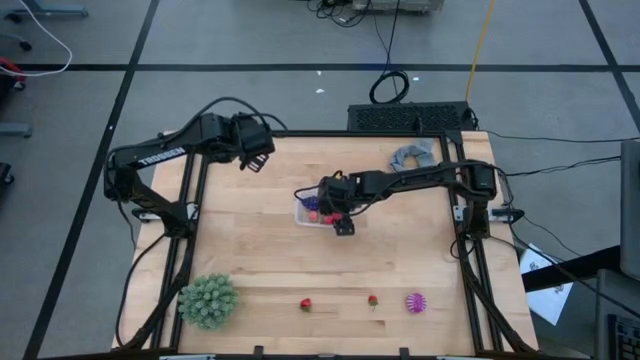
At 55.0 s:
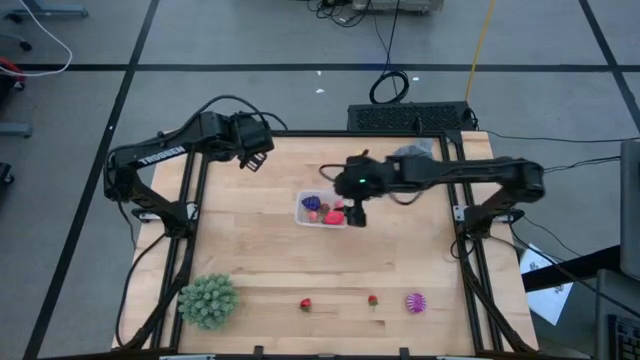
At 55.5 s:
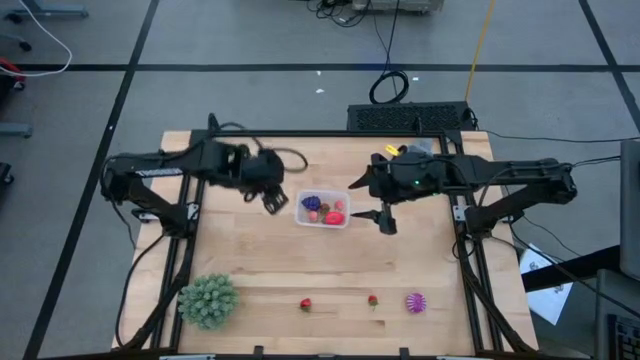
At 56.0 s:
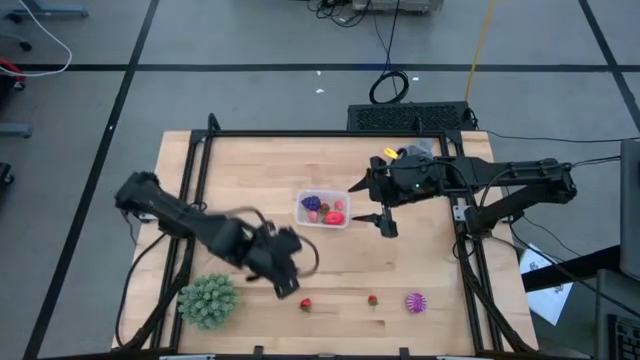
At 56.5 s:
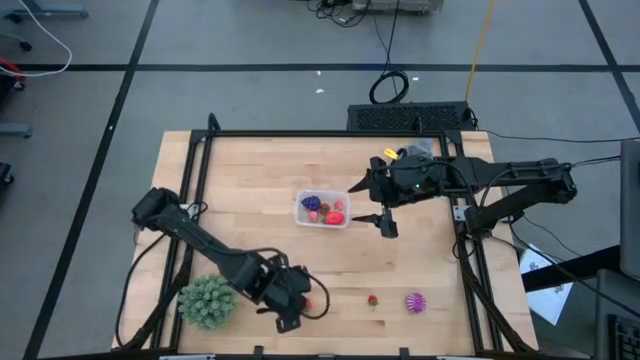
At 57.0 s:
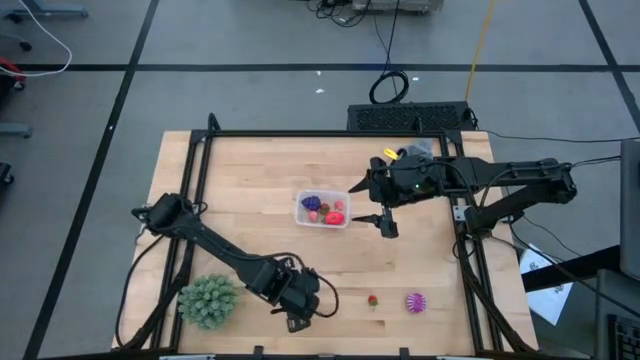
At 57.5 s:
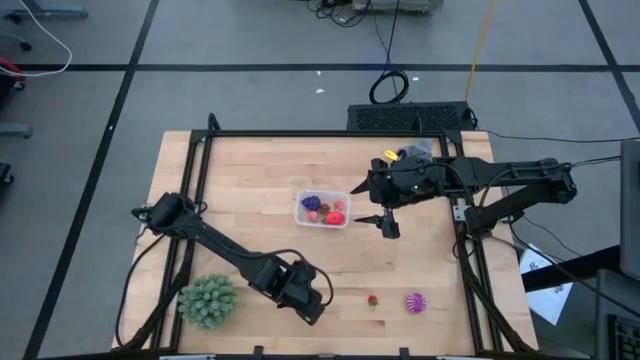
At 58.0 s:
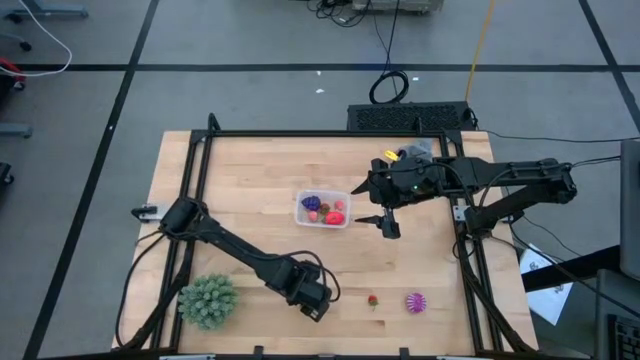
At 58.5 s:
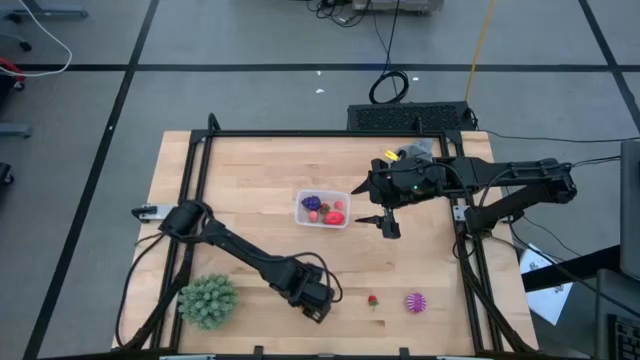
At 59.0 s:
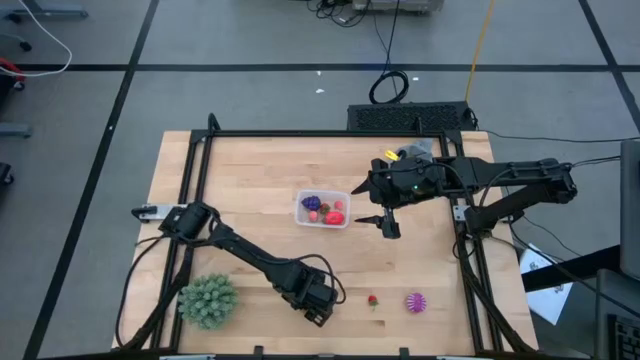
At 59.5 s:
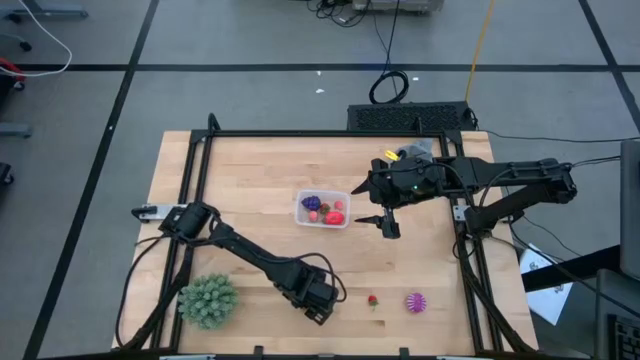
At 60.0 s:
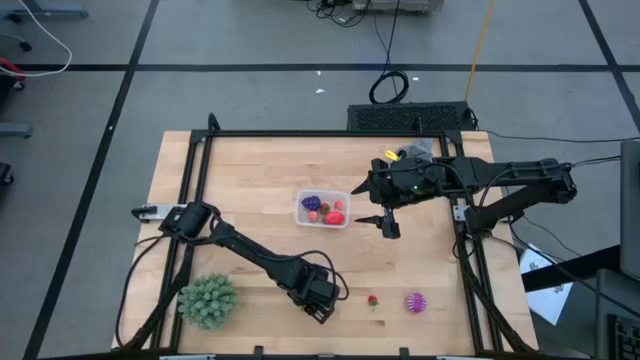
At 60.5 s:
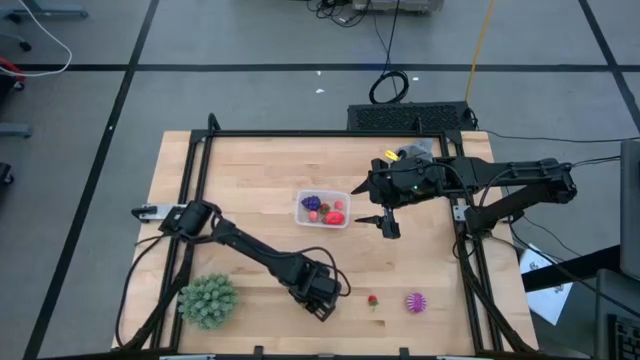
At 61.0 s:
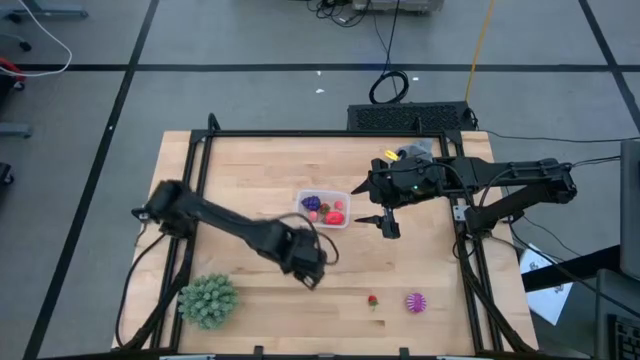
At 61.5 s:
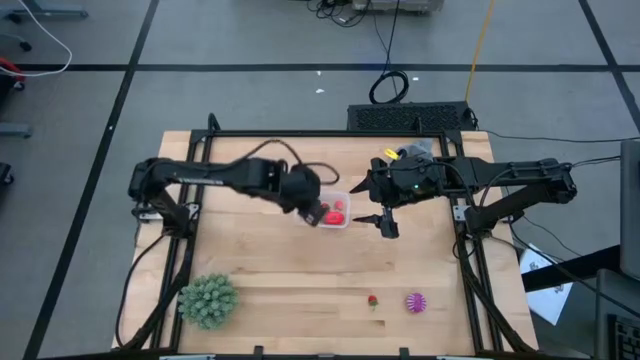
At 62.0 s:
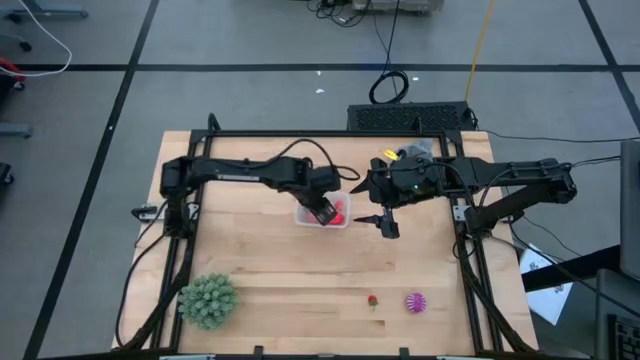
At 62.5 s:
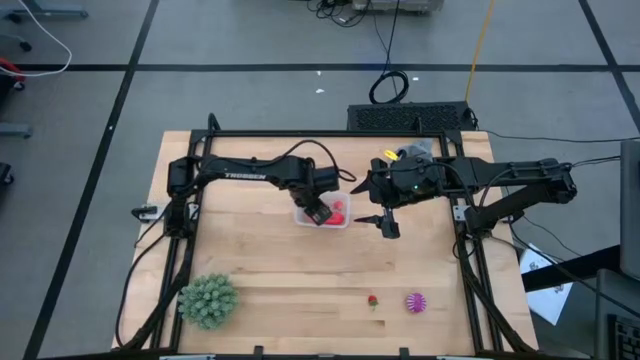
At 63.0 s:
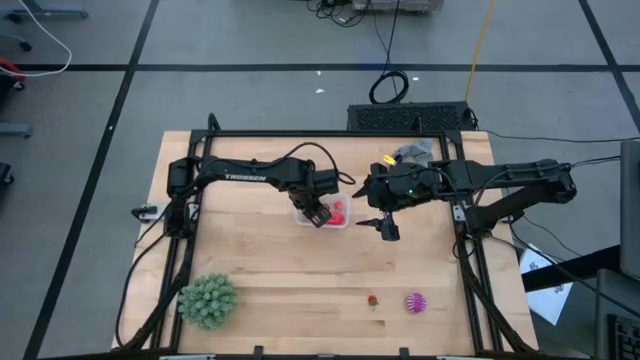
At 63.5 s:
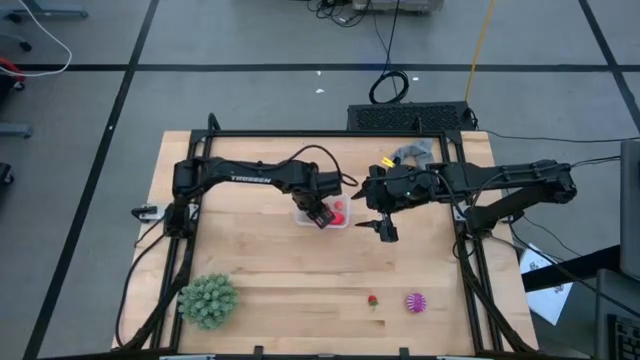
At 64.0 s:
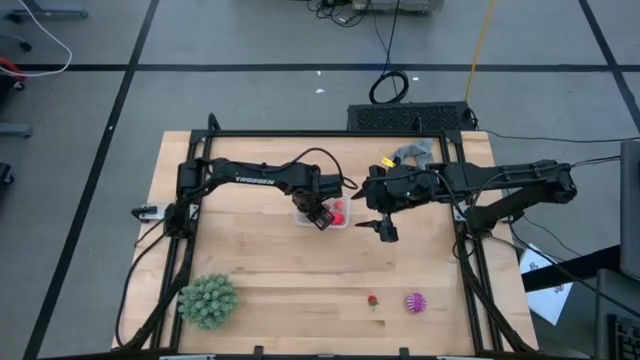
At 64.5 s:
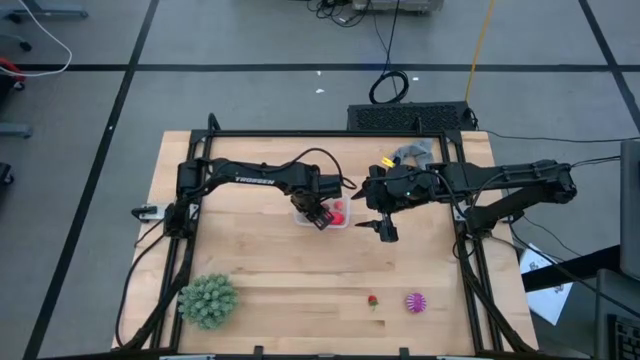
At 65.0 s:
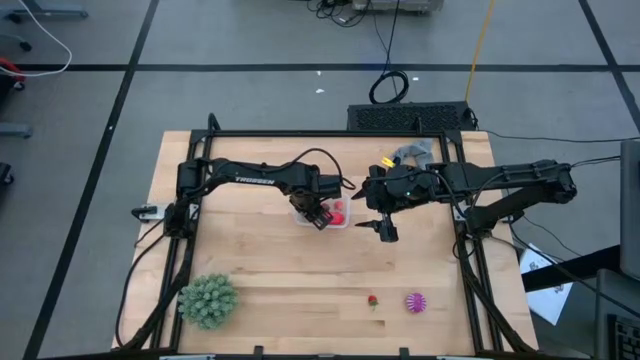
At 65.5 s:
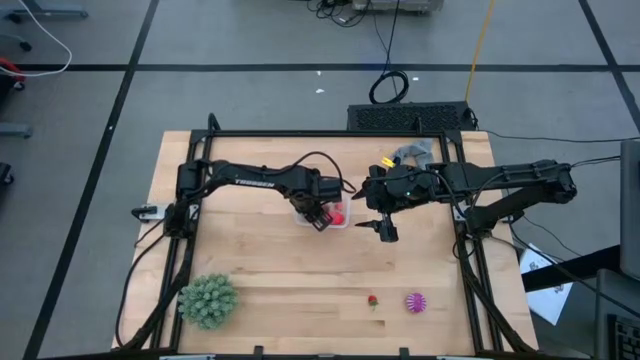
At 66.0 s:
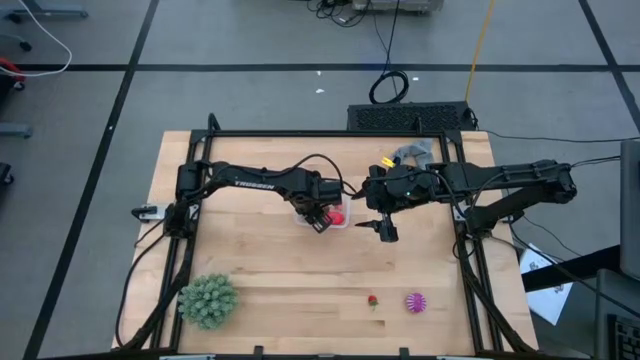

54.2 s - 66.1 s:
Task: Pick and placing Produce into tupperware
Put the left strawberry into the transparent bin

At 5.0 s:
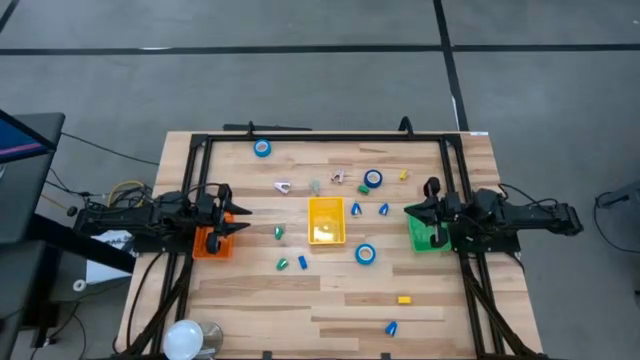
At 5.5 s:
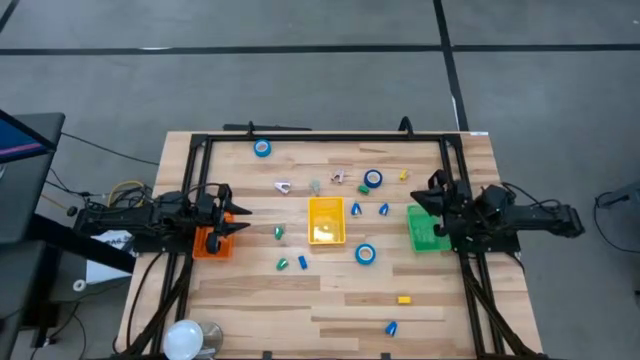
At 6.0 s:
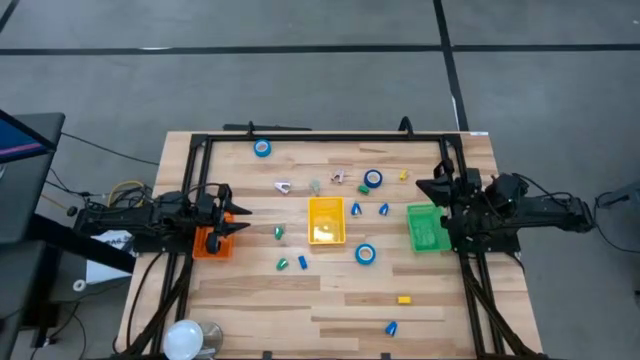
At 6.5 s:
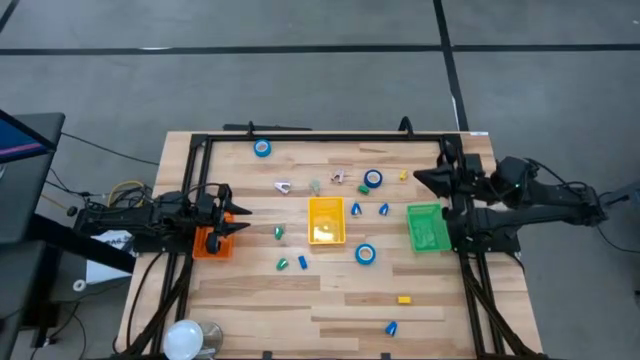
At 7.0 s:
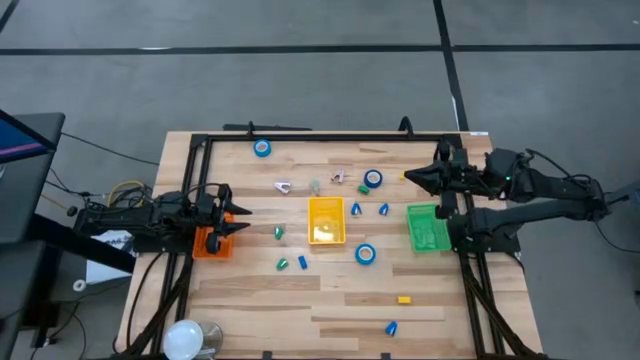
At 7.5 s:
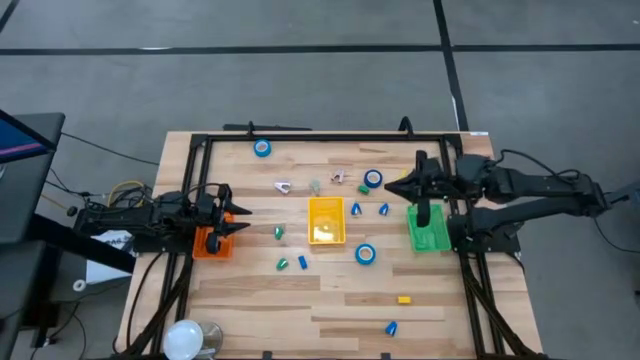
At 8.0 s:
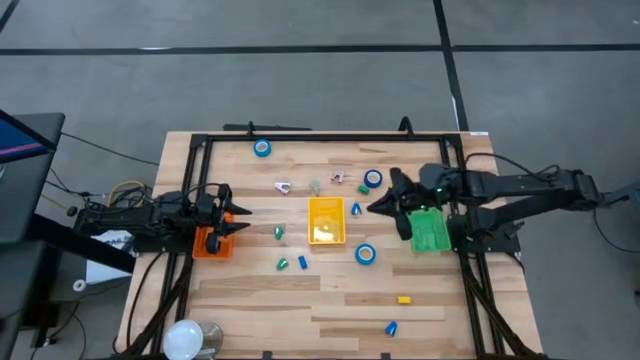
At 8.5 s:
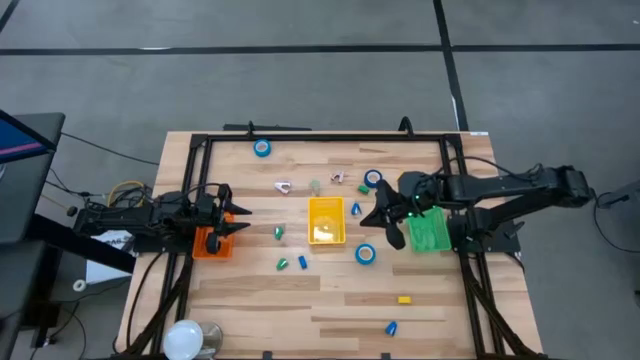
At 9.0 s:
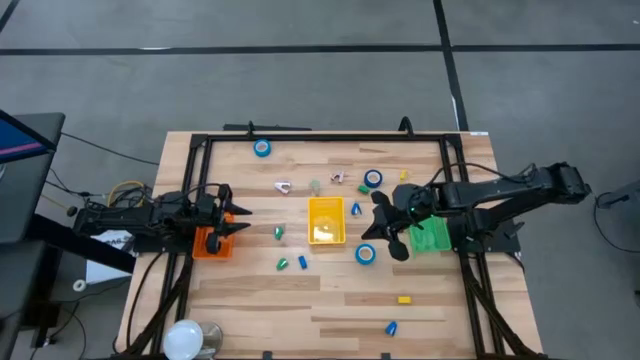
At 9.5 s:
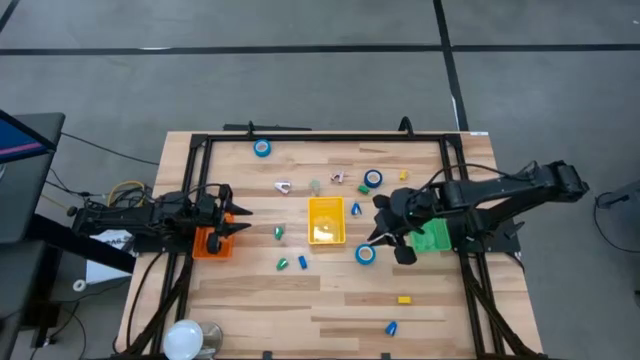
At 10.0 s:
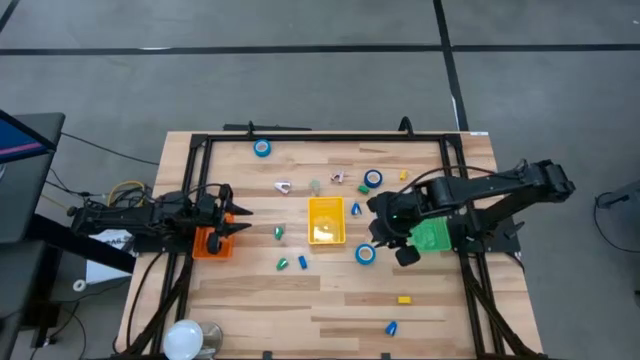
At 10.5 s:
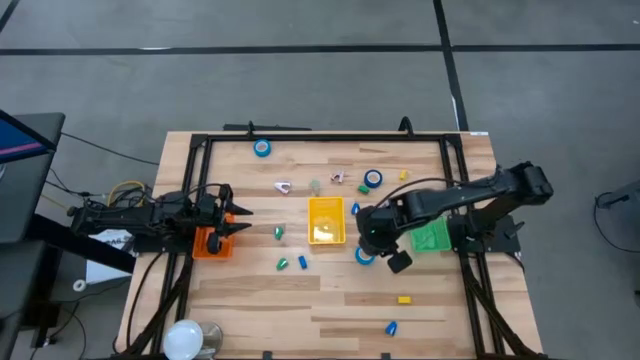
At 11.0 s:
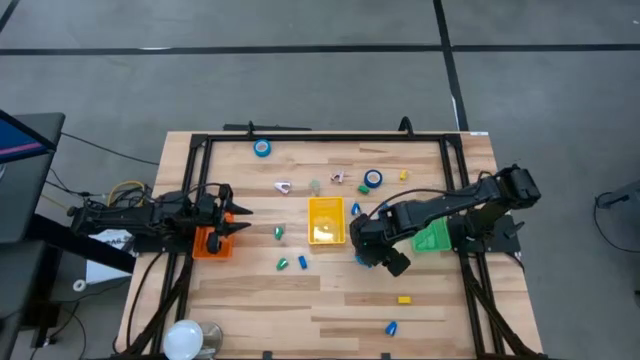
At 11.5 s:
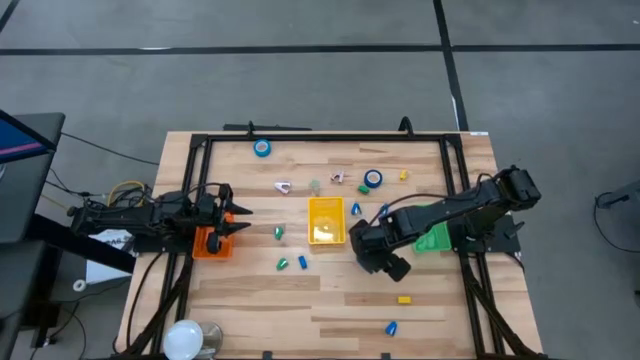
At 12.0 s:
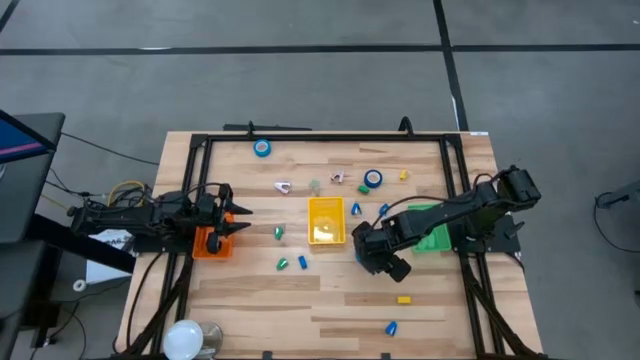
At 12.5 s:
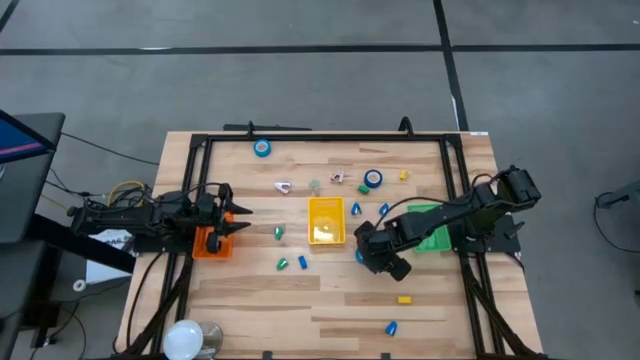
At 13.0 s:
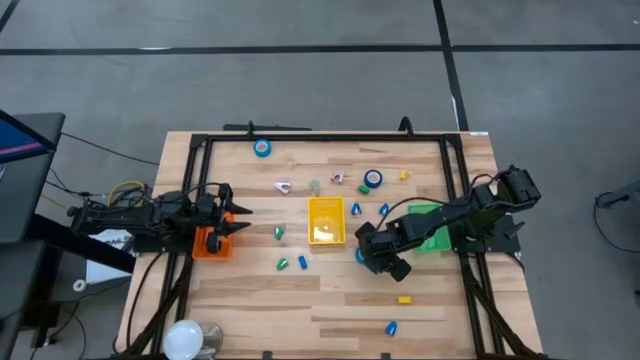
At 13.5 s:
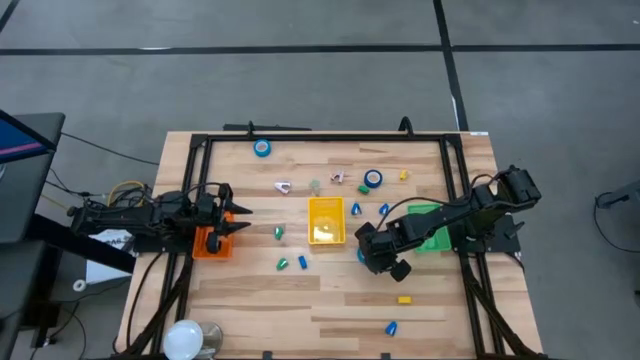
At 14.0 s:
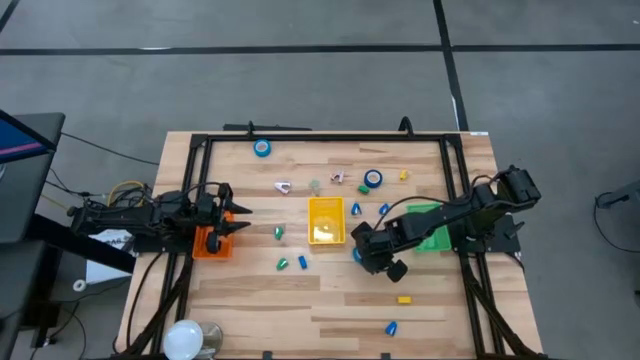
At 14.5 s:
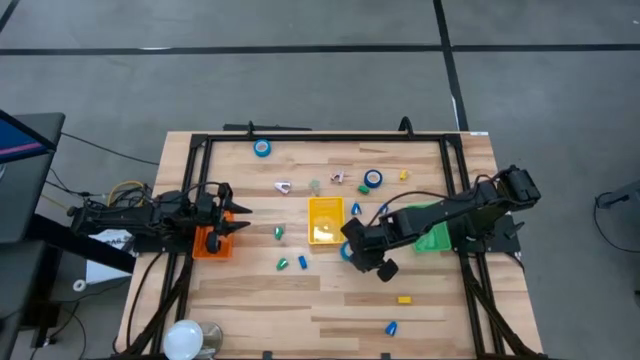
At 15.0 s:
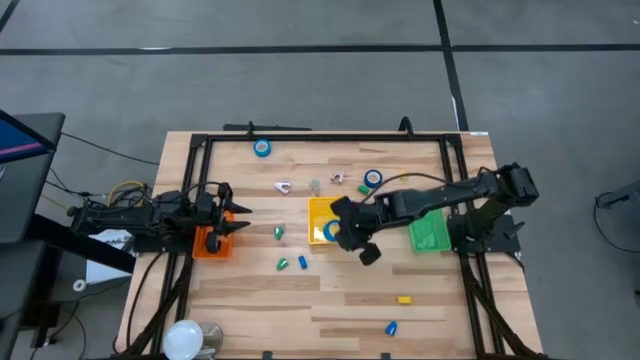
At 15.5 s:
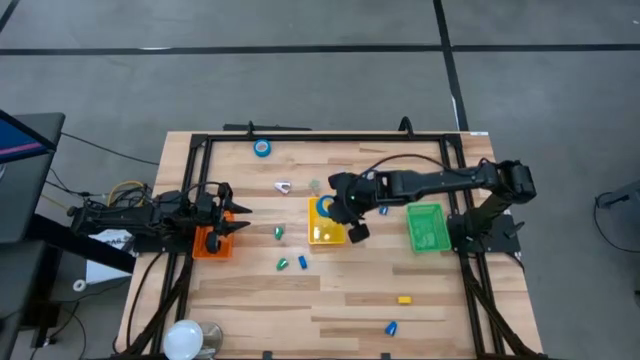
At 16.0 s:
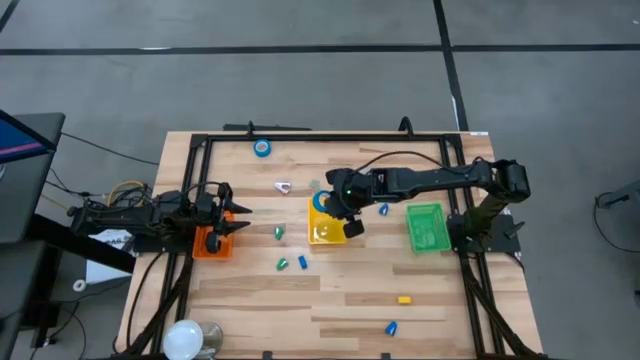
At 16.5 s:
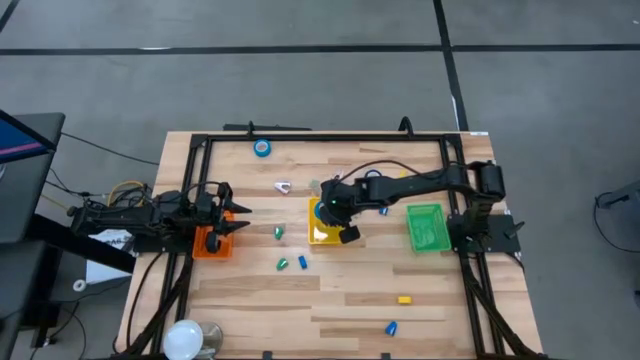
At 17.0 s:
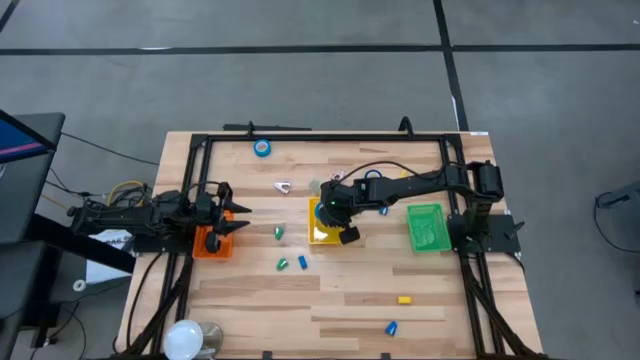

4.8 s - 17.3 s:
Task: Pick and place Stapler, Stapler remover, tape
Put the blue tape into the yellow basket
